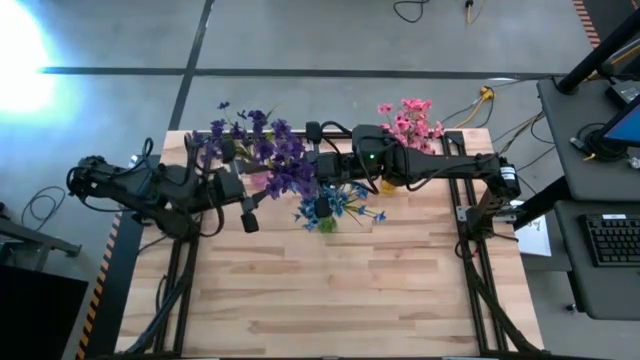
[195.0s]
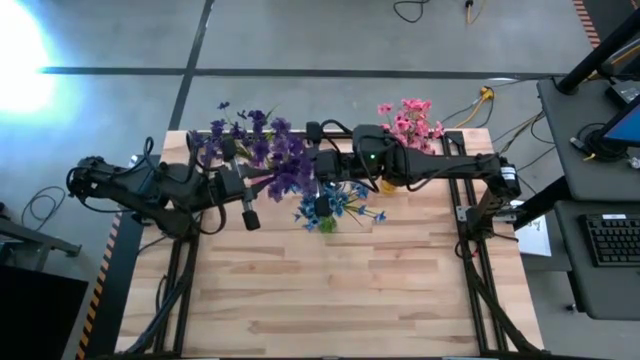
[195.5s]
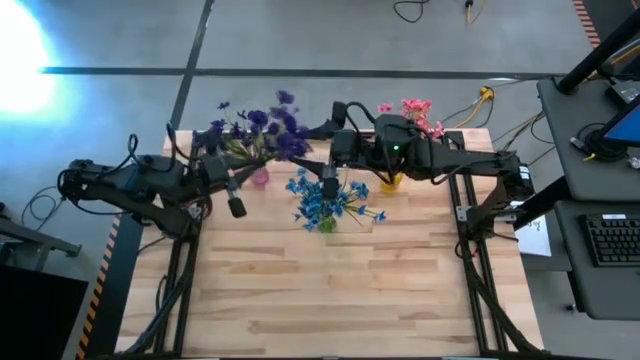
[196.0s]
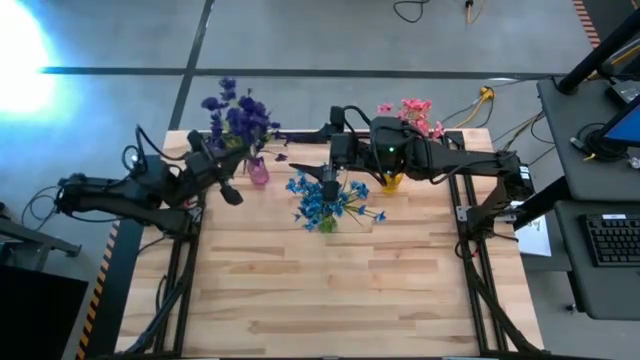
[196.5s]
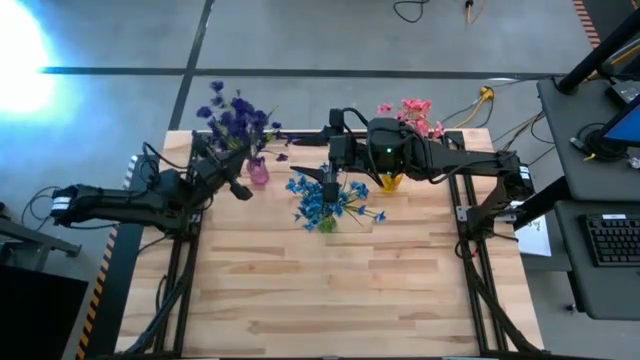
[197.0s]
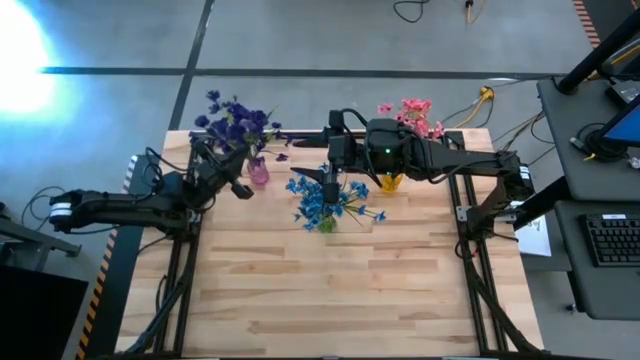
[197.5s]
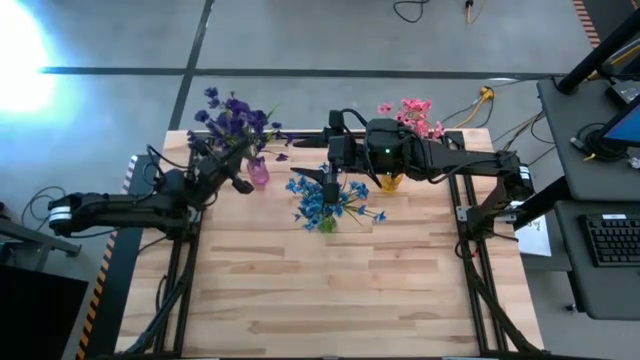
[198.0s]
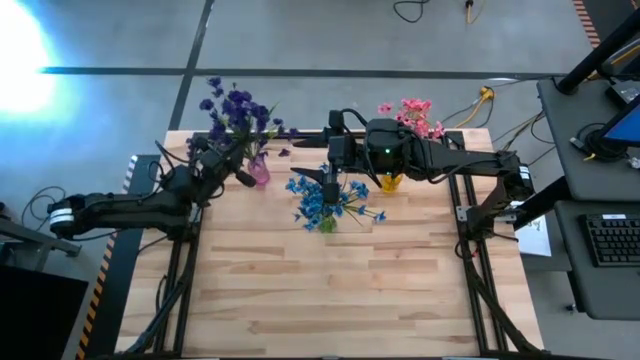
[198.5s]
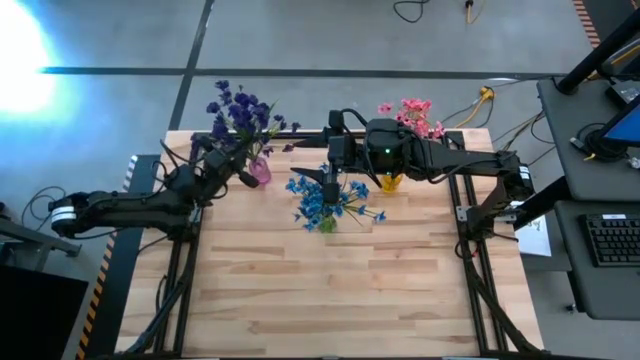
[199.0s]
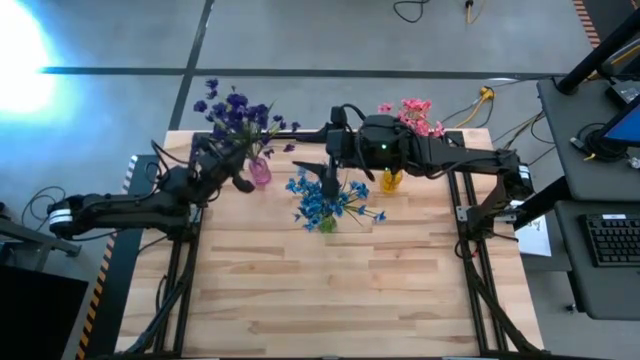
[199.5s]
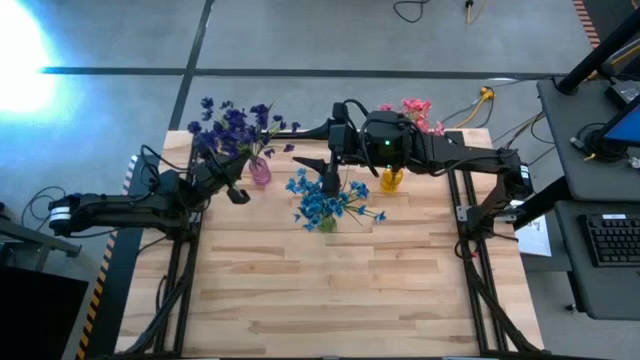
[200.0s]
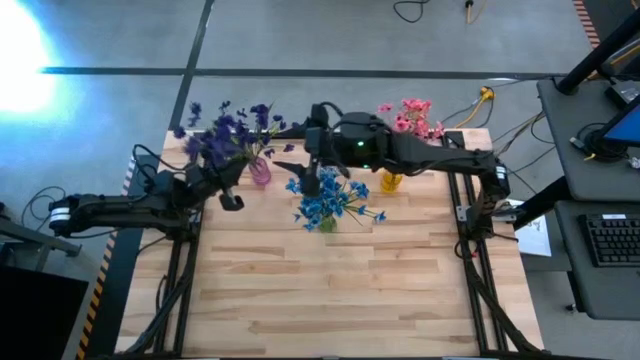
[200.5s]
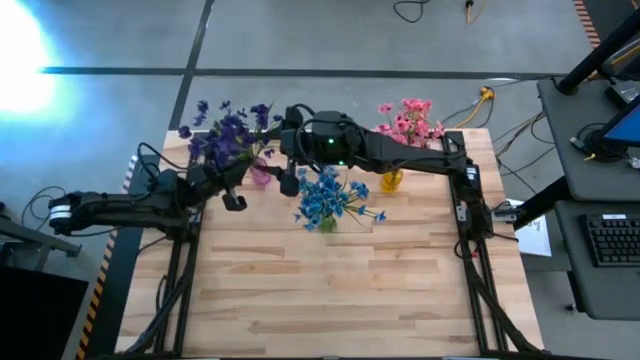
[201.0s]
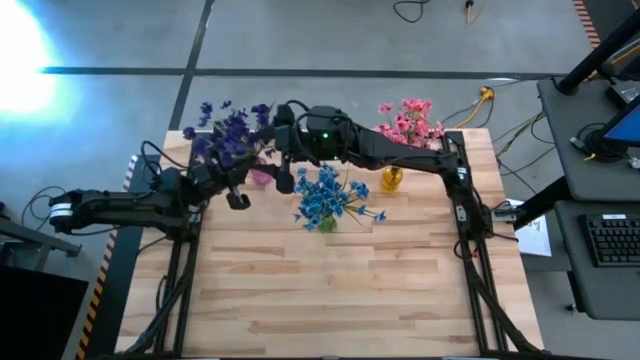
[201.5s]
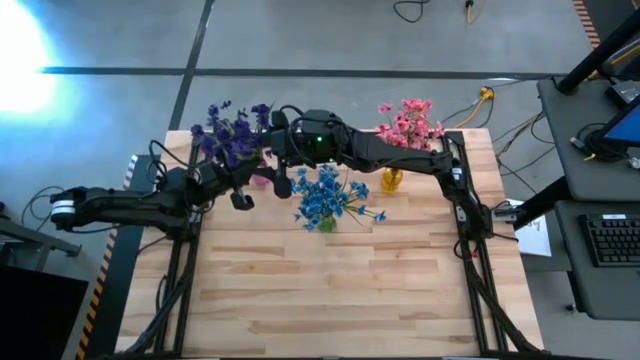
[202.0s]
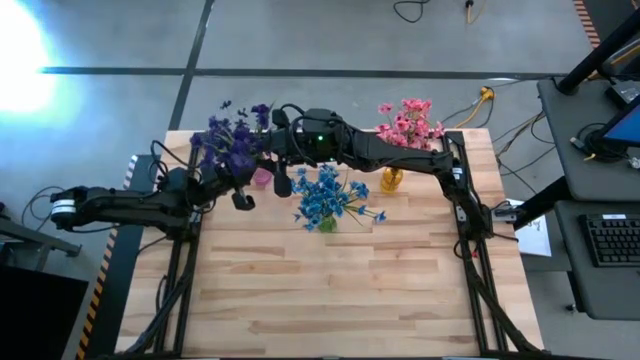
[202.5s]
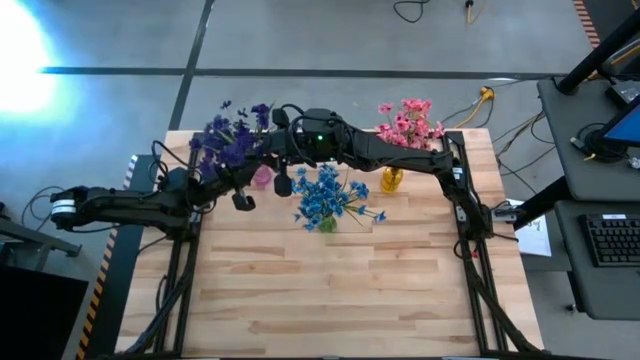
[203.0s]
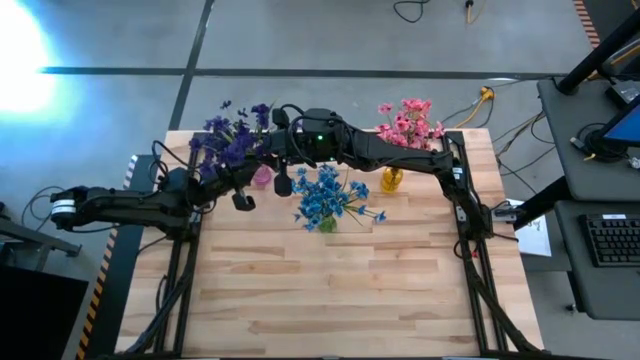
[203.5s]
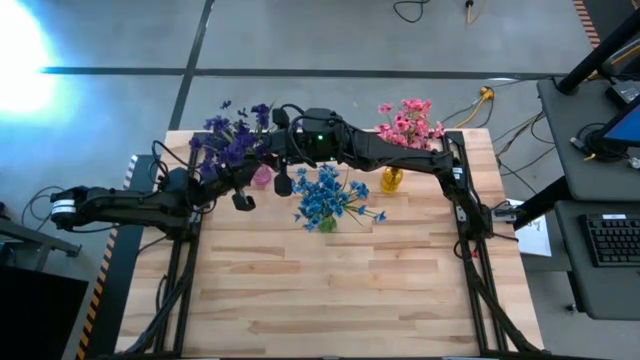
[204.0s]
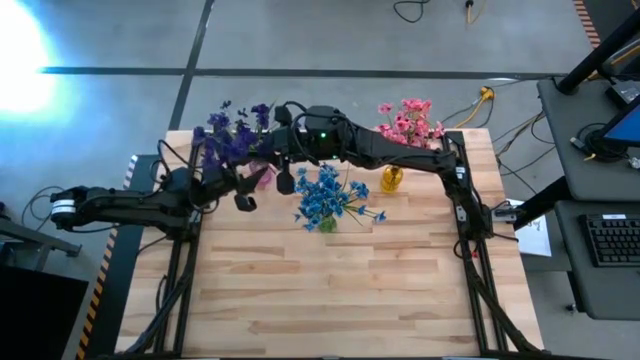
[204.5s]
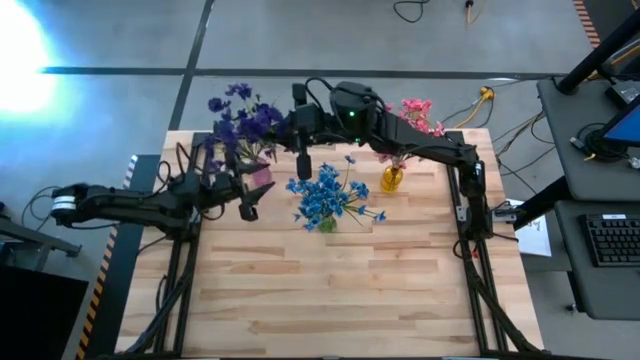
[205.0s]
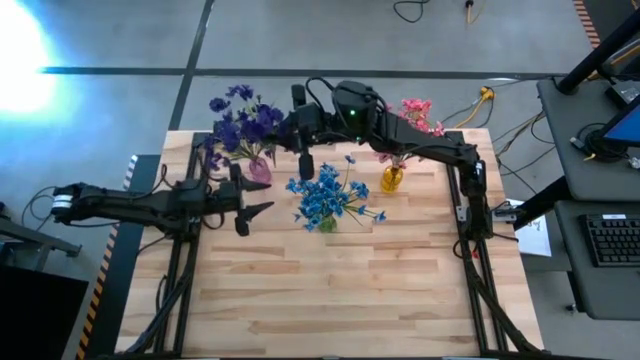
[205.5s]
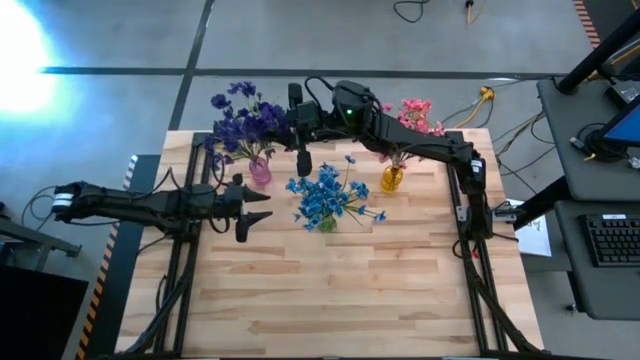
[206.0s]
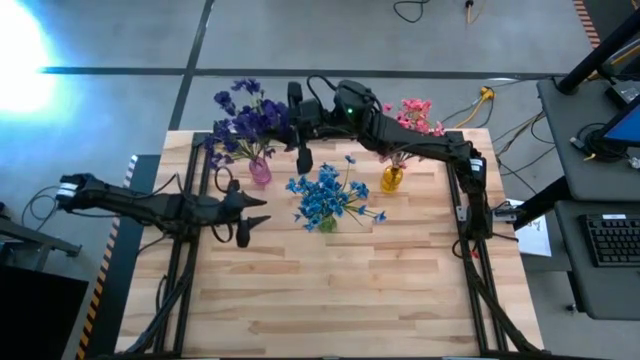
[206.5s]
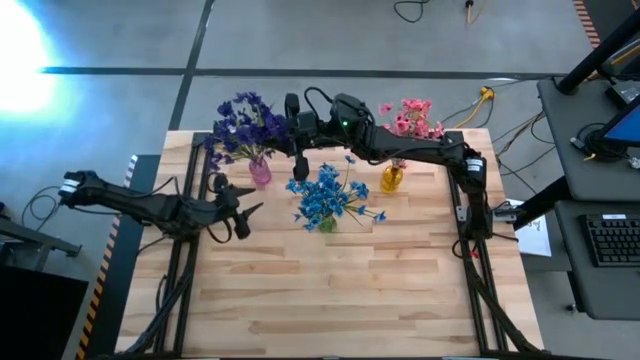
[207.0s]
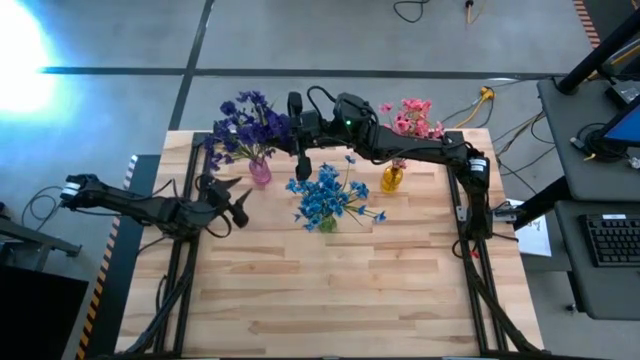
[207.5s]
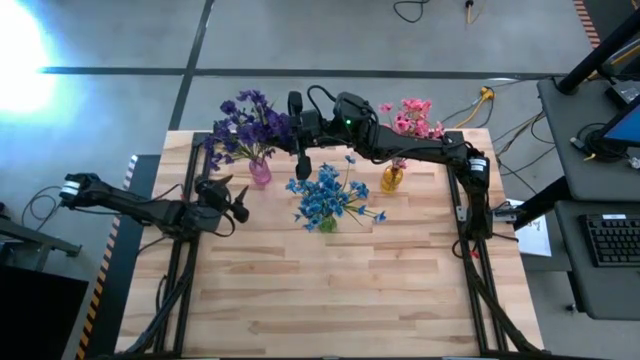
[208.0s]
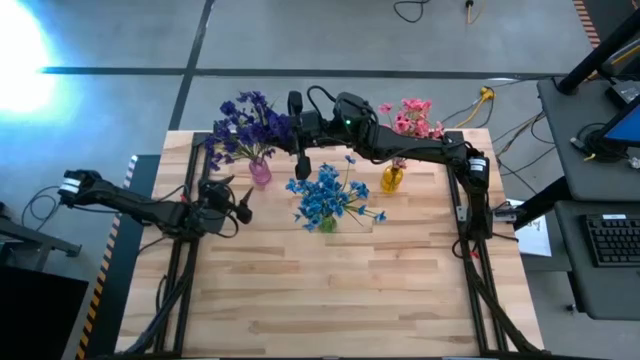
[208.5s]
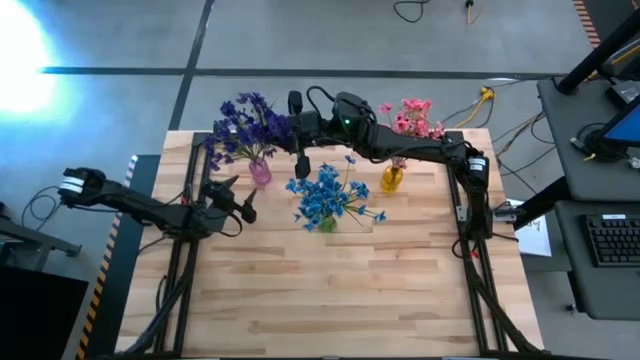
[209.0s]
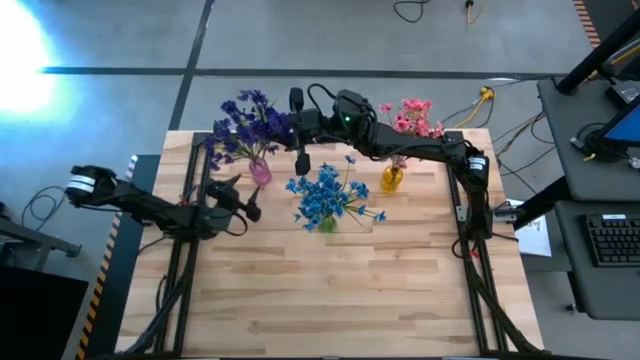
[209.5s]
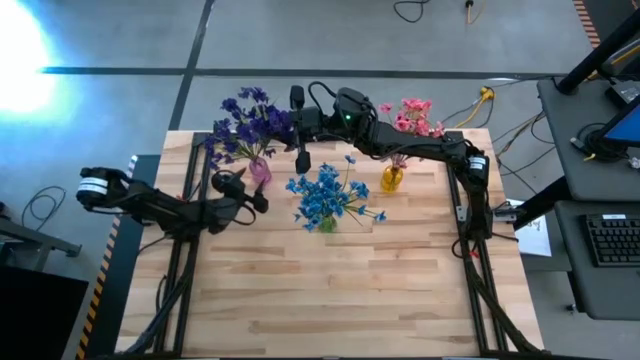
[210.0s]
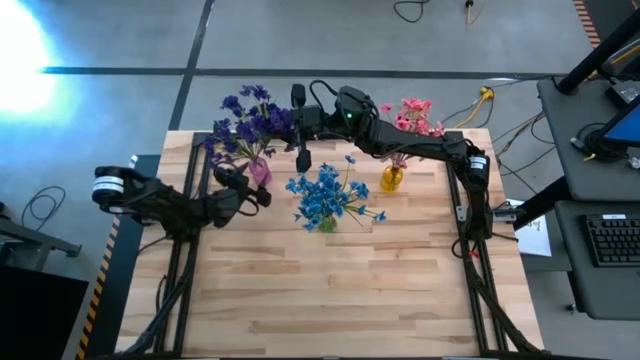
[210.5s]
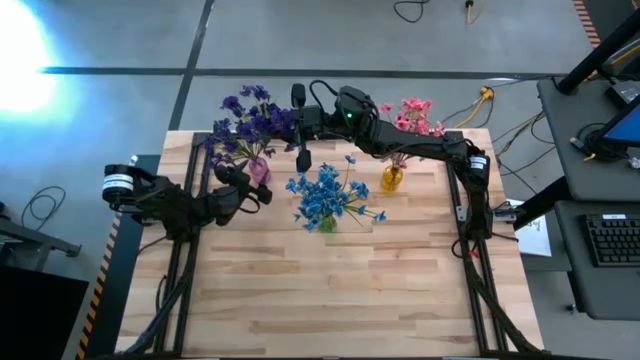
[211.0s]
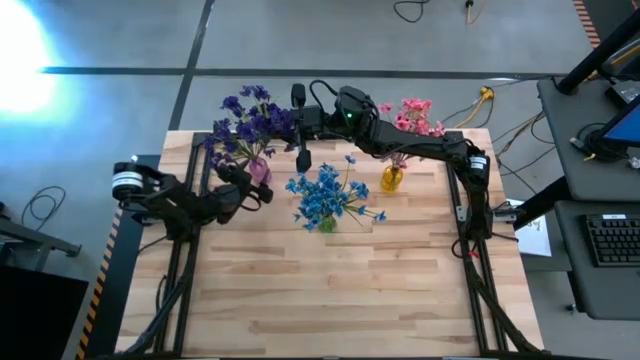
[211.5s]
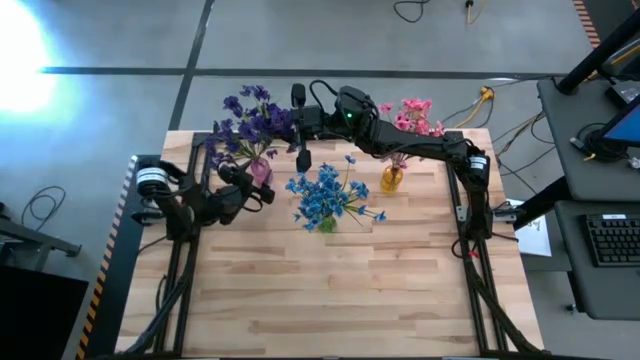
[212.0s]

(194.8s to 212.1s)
Task: Sort flowers into vase by color
Put the violet flowers into the violet vase
